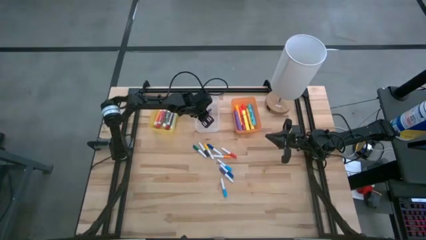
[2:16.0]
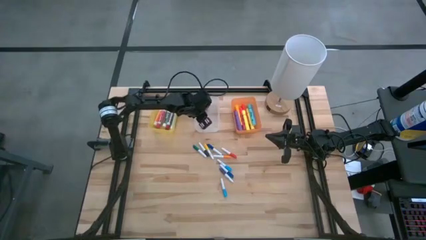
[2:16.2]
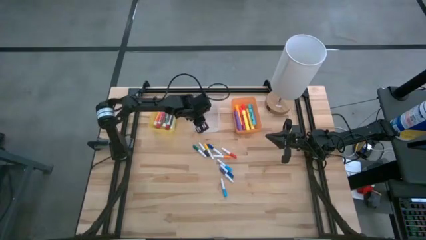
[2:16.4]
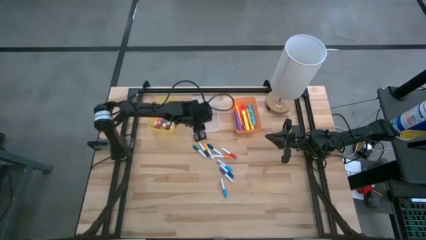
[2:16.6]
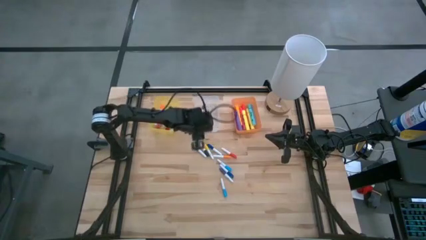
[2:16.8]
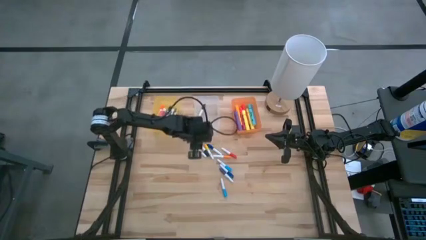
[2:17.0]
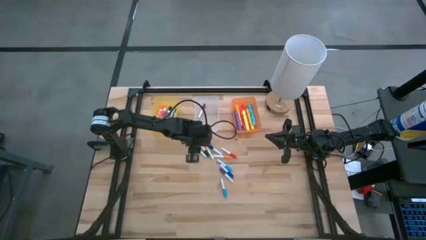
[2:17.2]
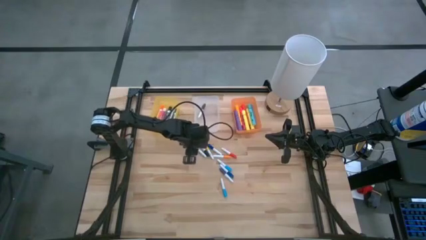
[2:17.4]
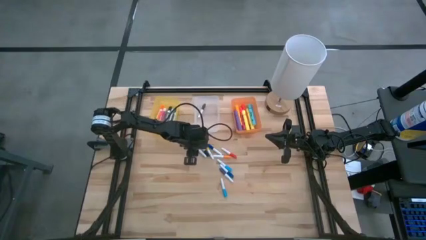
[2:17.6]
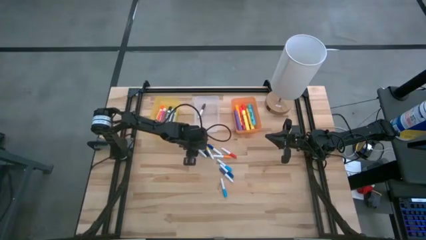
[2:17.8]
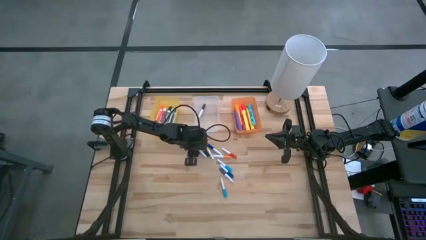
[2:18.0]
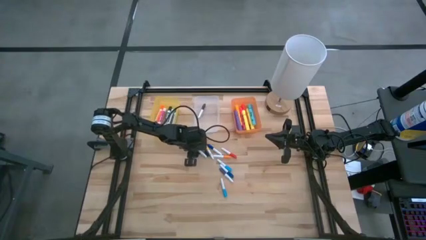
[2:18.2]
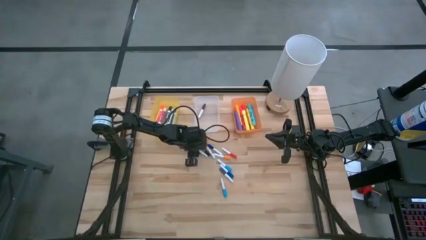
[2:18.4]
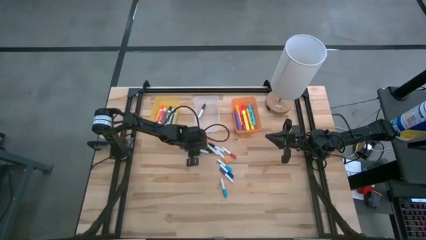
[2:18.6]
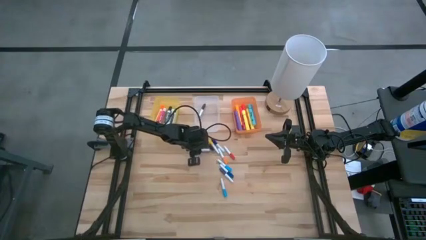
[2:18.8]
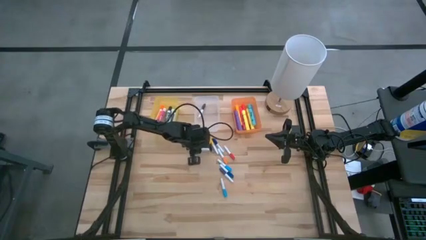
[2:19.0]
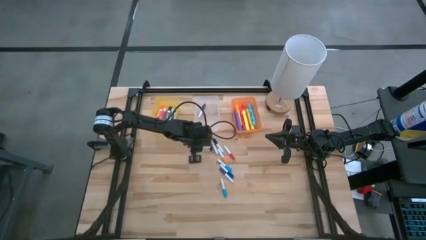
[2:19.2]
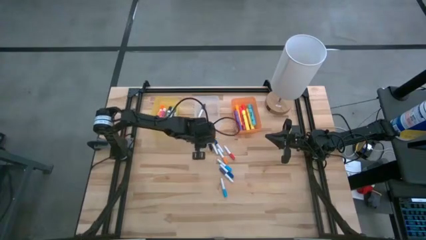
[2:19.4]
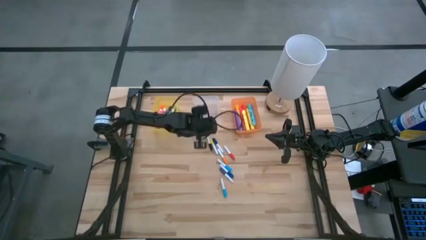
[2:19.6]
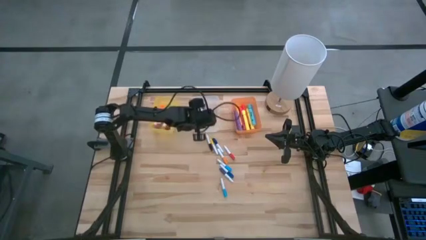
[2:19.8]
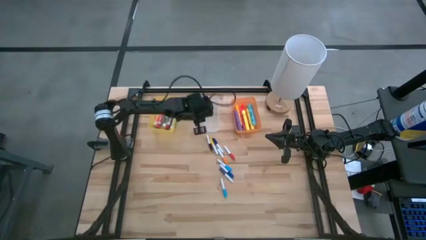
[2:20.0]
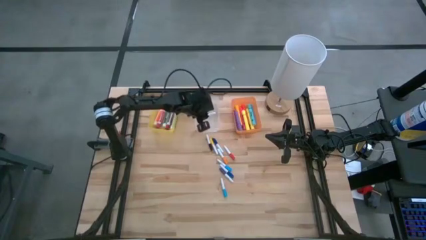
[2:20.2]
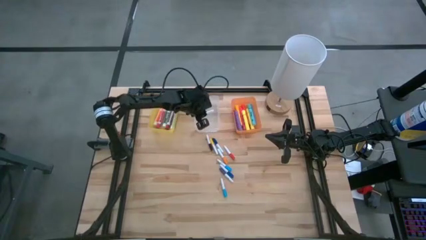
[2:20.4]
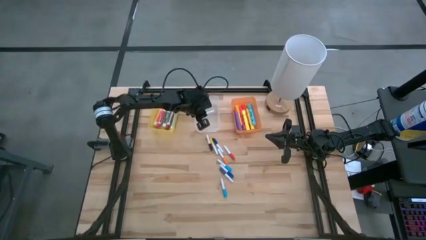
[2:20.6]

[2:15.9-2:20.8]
Task: Pick & Place Markers
Put the small green highlighter pen into the transparent bin

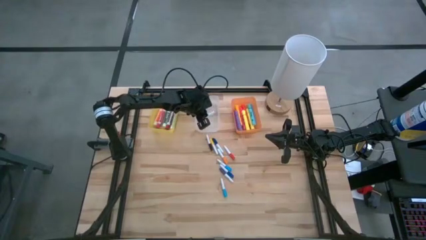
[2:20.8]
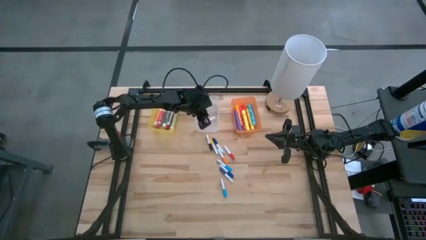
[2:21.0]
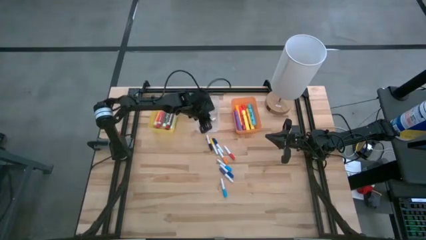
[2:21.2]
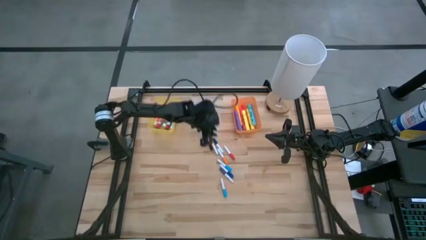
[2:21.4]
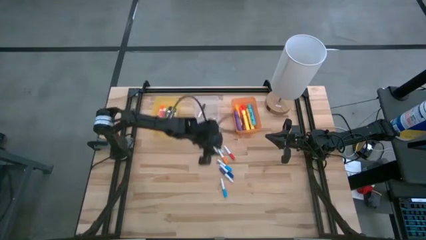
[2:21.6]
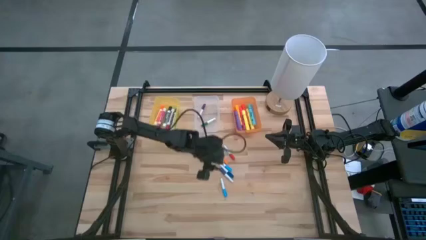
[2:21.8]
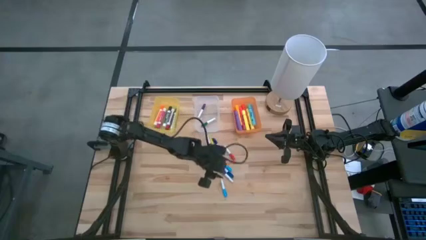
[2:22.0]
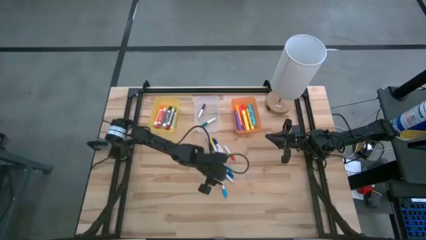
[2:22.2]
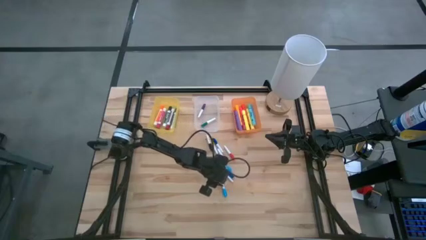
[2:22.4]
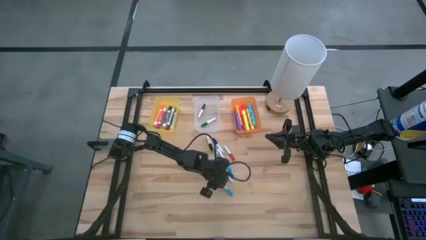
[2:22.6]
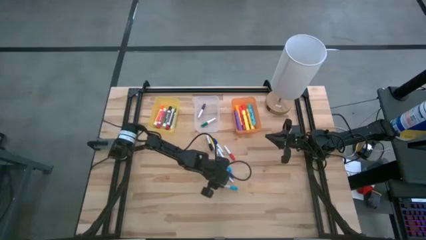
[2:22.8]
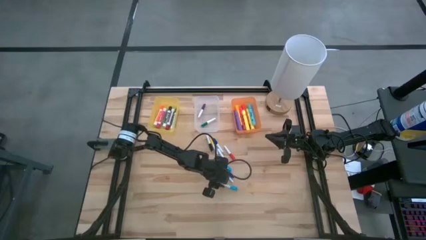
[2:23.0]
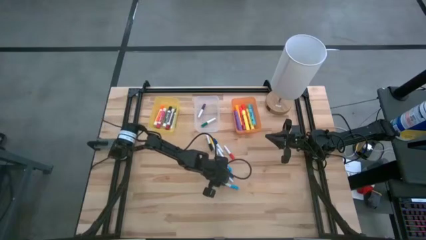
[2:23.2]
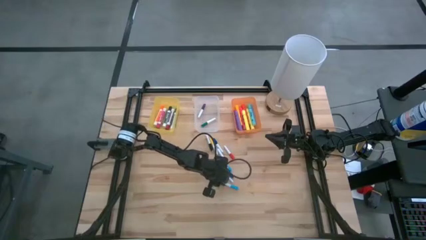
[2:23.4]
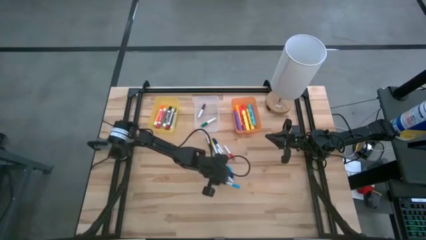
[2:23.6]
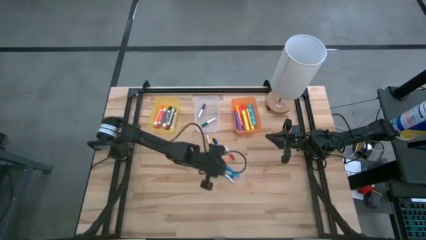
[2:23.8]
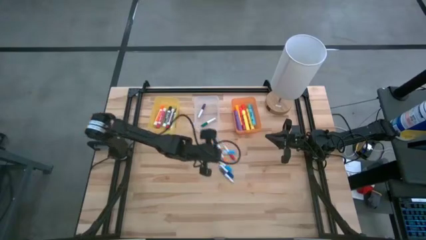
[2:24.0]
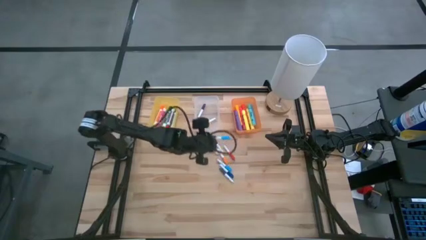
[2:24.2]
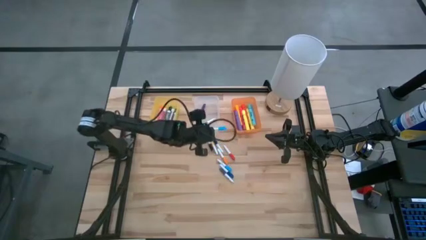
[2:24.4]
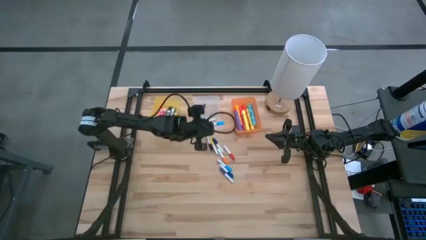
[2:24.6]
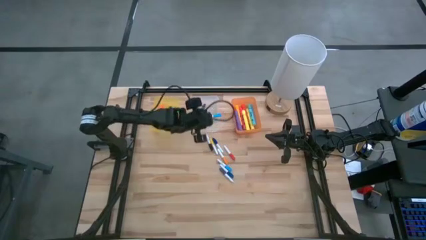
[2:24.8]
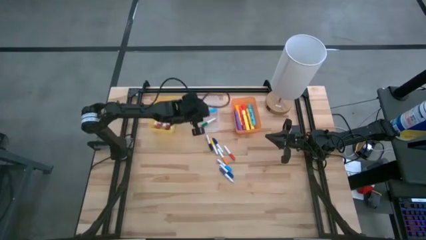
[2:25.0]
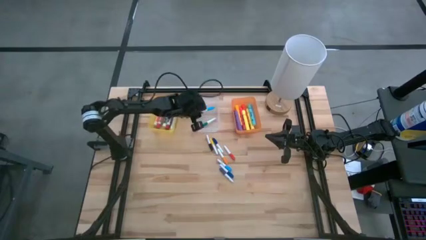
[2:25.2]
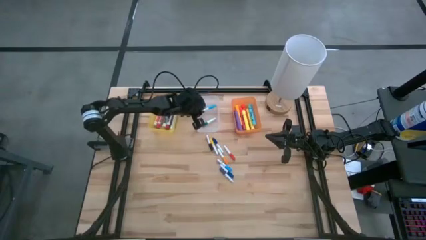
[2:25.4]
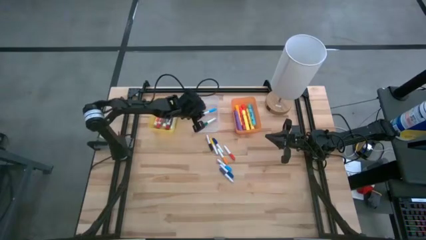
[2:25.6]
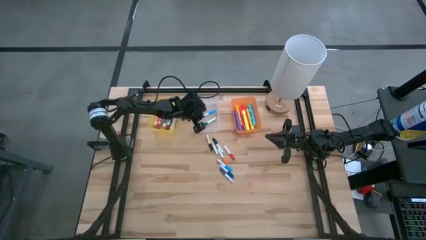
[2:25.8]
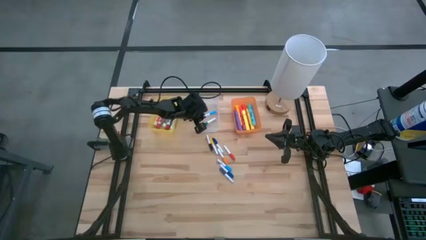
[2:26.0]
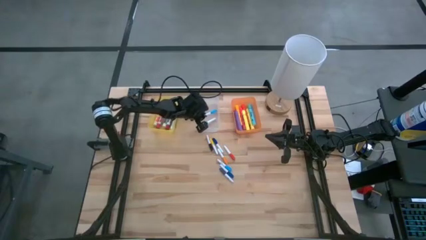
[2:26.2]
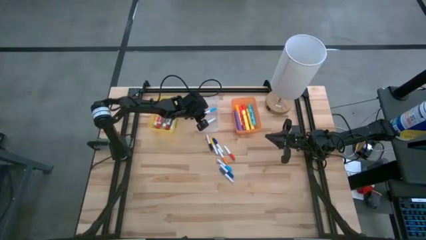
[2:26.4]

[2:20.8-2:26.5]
Put the bottom small light blue highlighter pen into the transparent bin

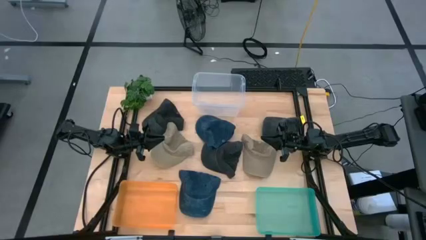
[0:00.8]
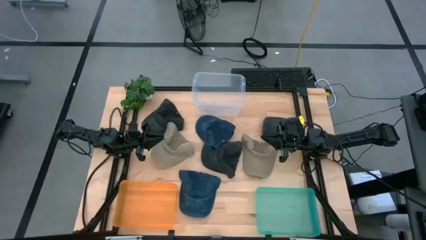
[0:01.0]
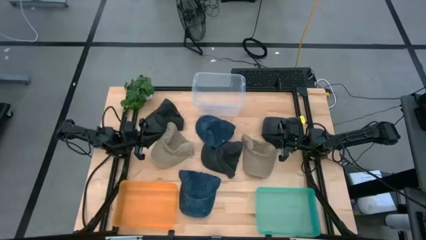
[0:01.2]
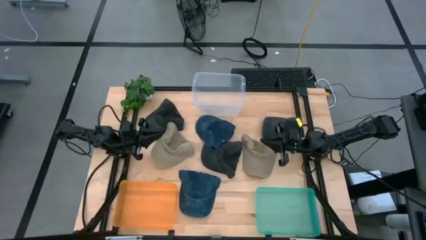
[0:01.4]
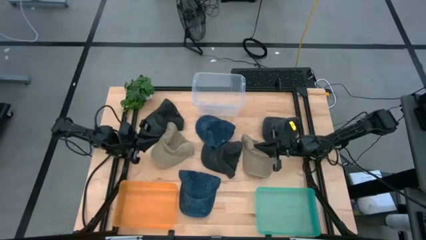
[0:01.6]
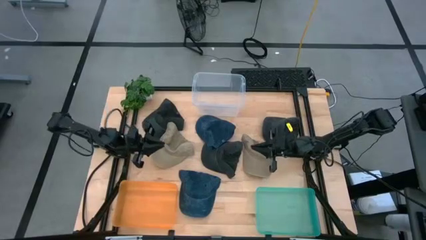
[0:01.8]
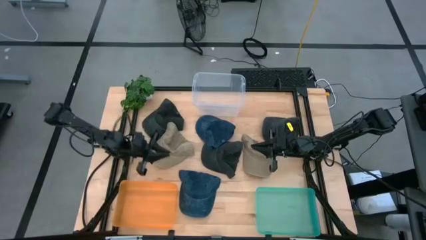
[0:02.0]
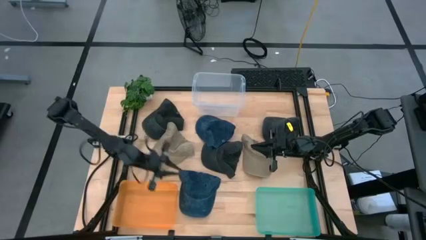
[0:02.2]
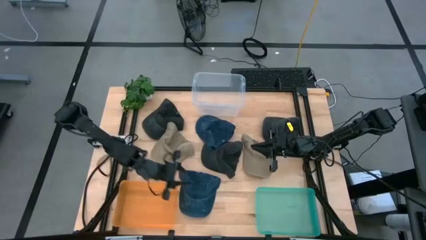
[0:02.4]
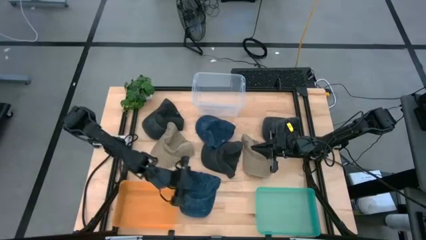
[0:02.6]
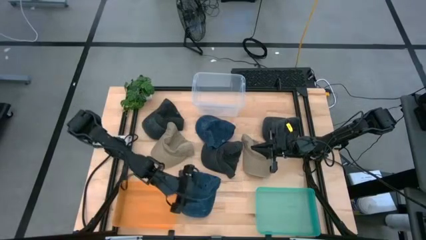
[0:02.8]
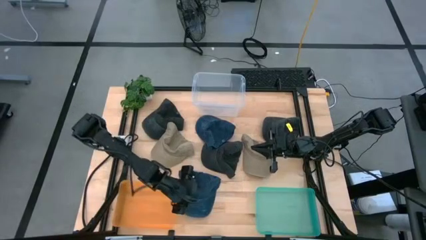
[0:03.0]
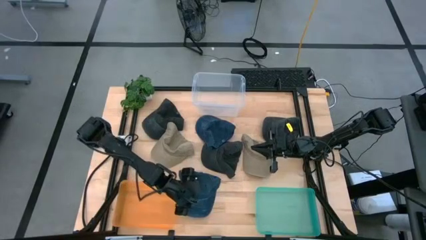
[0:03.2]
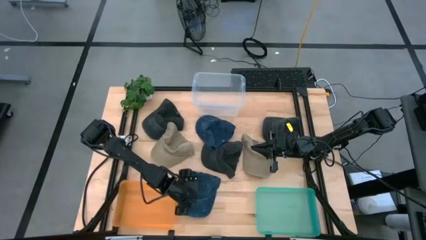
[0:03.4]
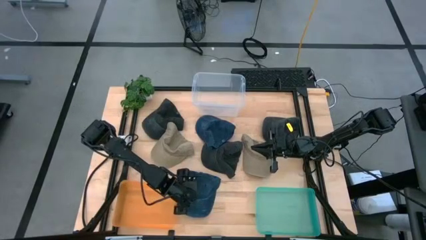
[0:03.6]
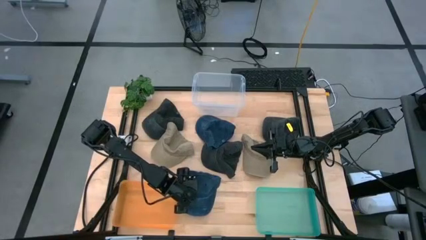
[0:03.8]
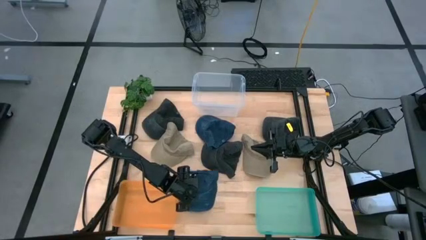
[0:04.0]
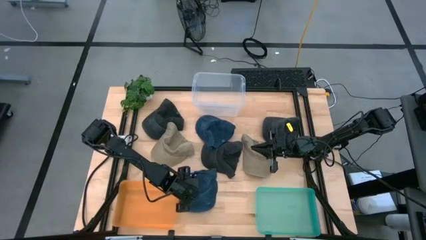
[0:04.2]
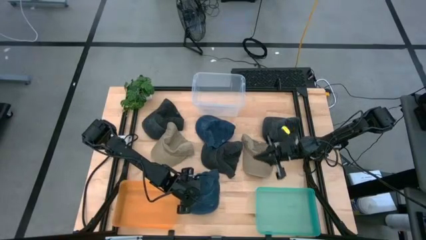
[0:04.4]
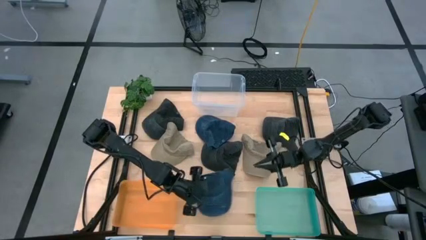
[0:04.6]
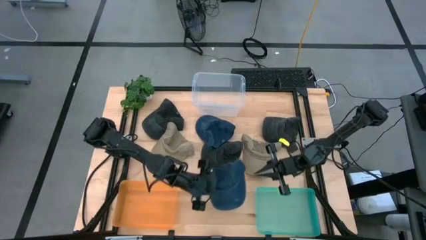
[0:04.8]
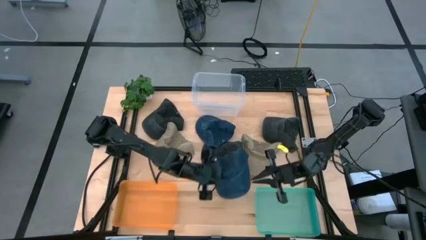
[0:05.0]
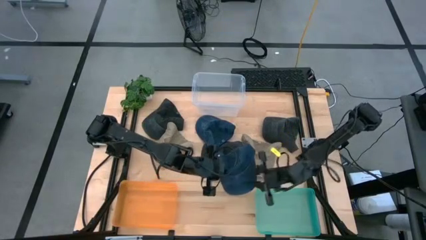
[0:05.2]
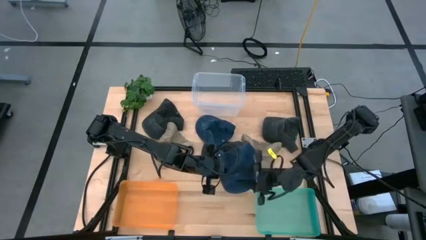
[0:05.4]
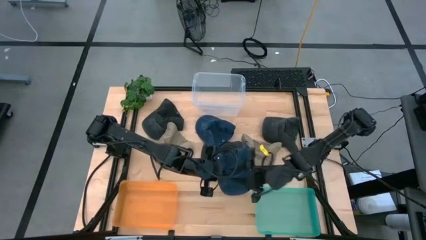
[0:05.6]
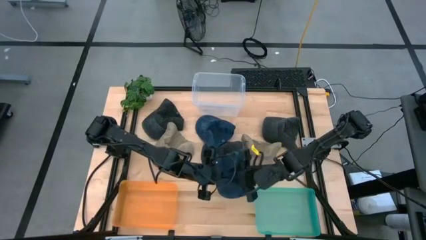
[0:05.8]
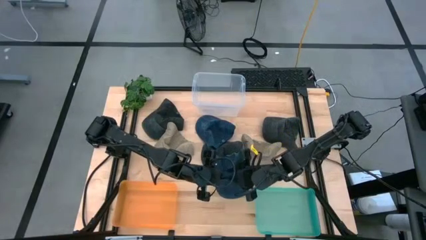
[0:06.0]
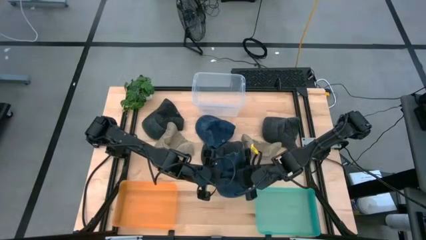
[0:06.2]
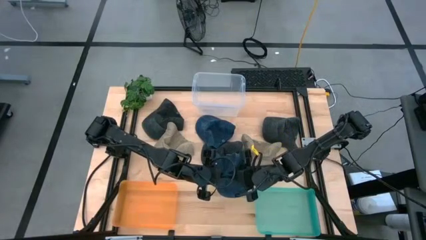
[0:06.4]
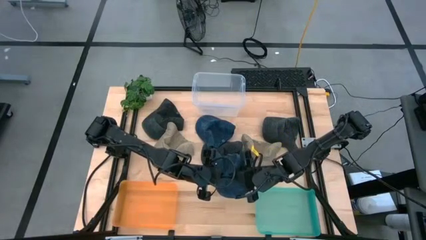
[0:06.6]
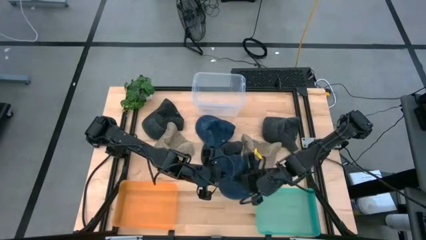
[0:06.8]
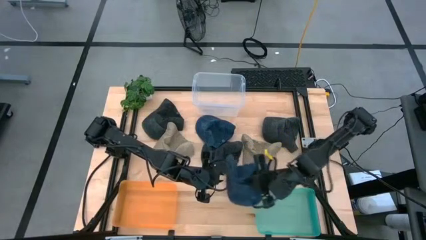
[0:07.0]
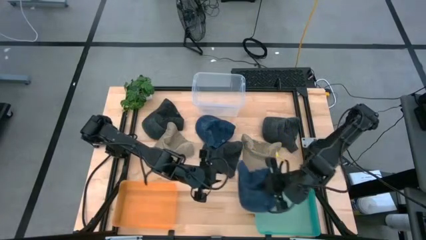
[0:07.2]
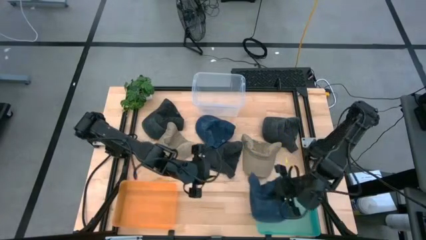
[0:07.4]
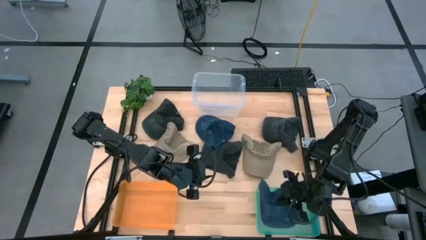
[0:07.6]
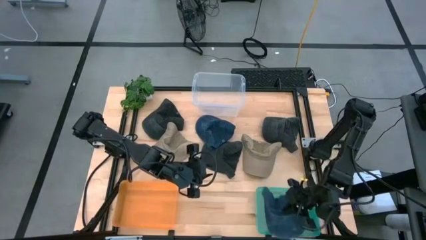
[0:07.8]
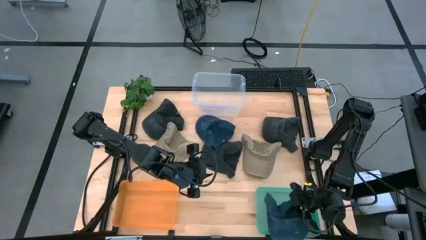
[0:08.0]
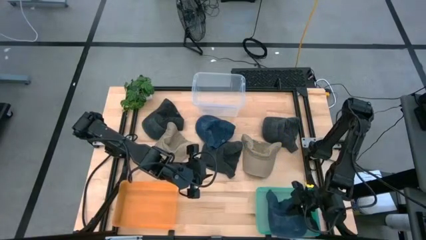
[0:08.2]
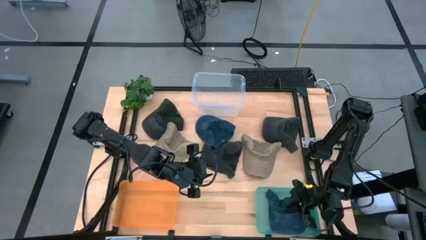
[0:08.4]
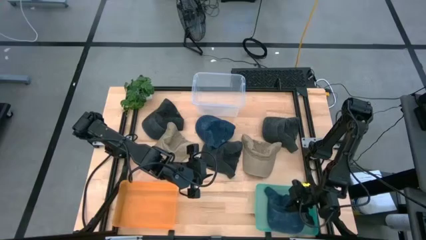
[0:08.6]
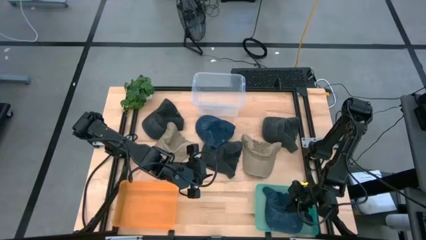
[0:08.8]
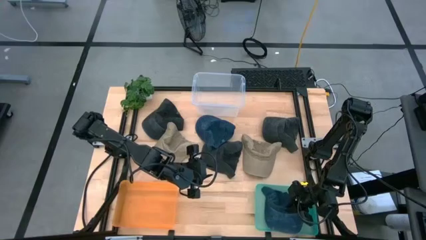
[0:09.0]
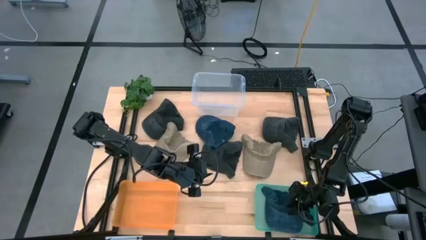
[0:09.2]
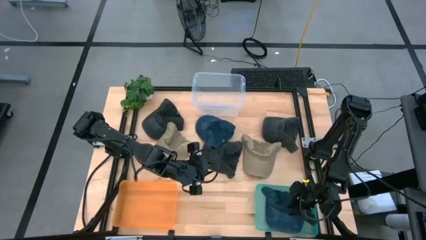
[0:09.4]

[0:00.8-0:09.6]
Task: Pick & Place hat
Put the bottom blue cap into the sky blue bin
